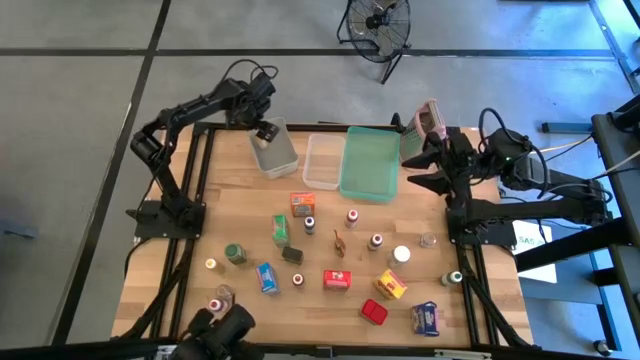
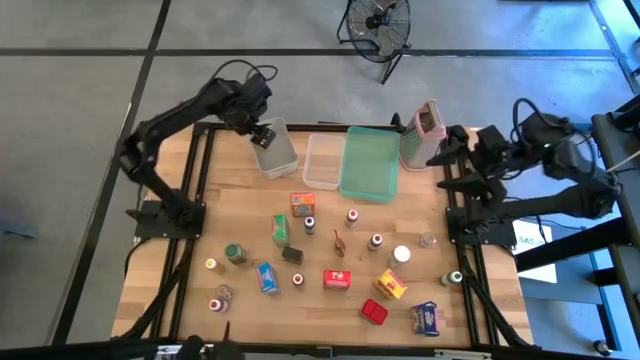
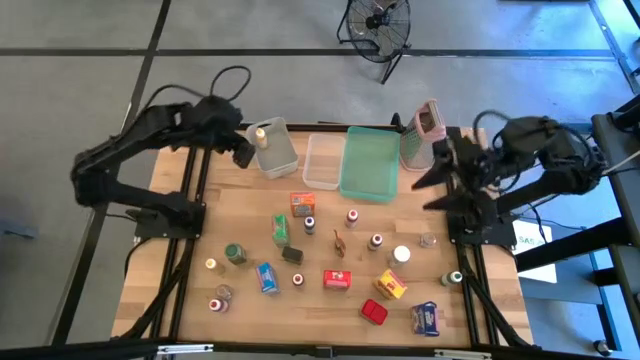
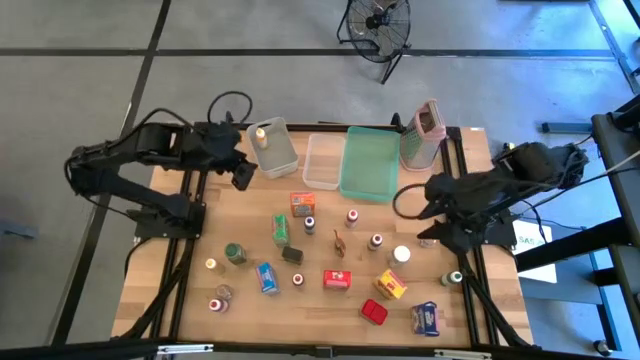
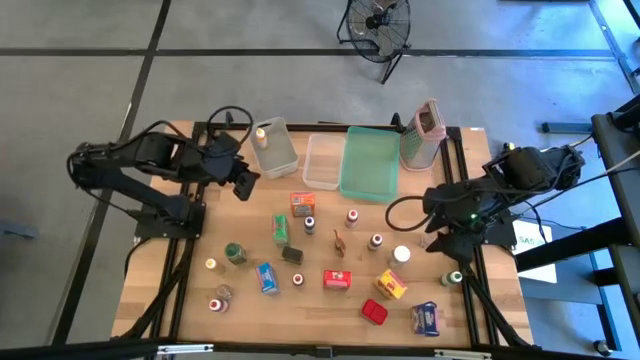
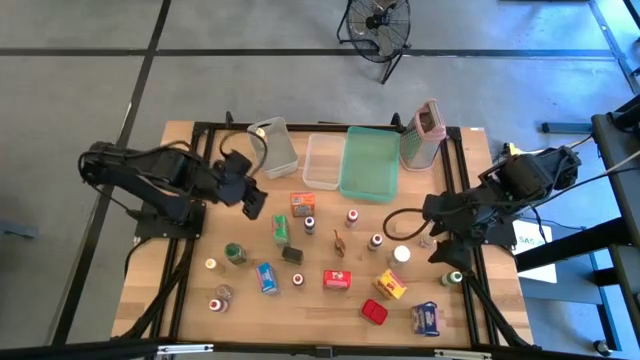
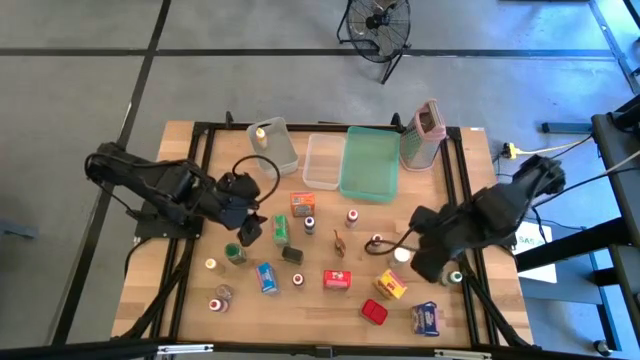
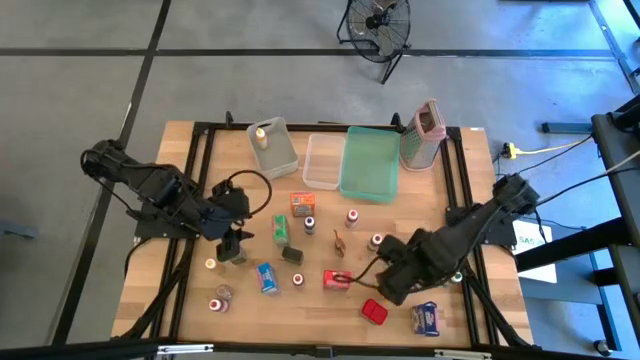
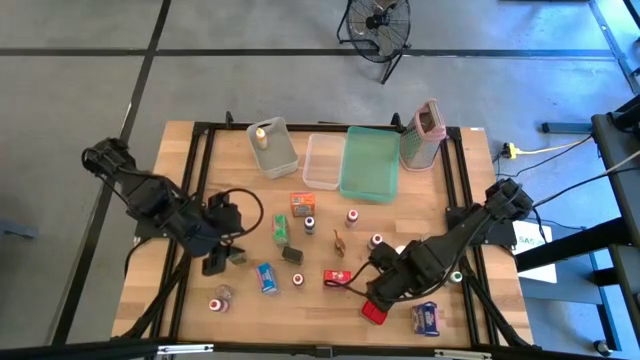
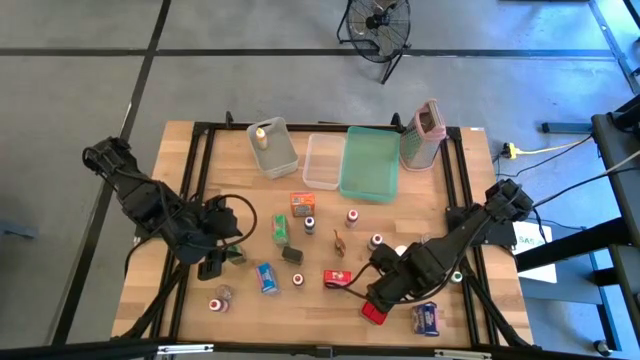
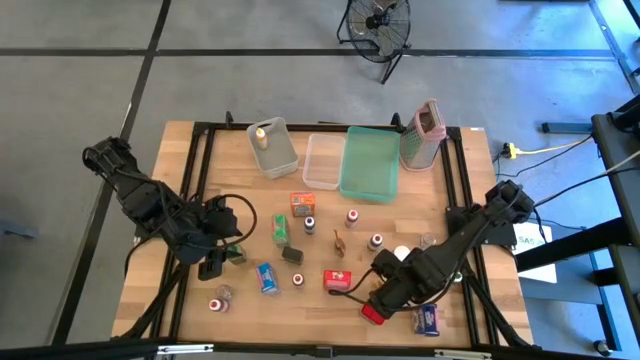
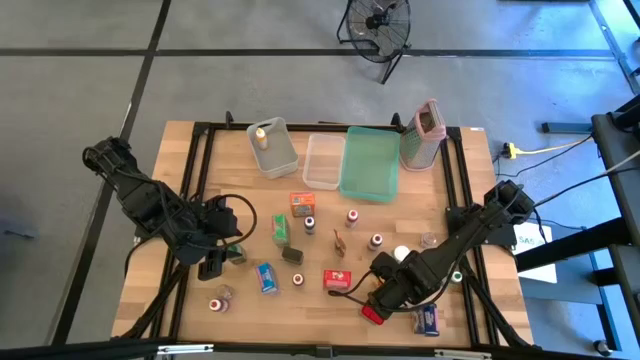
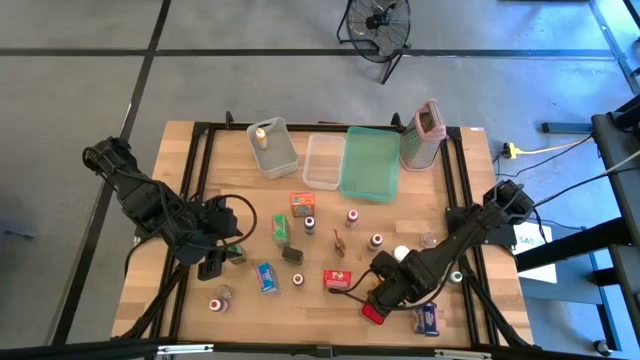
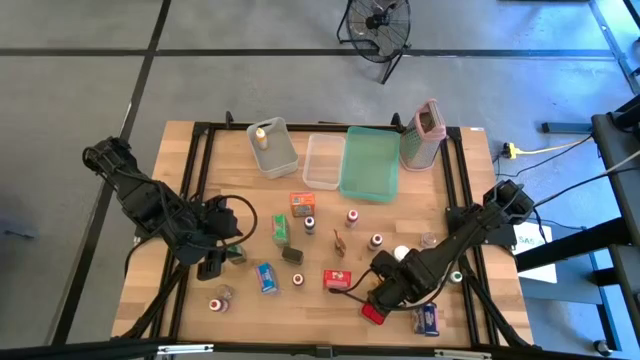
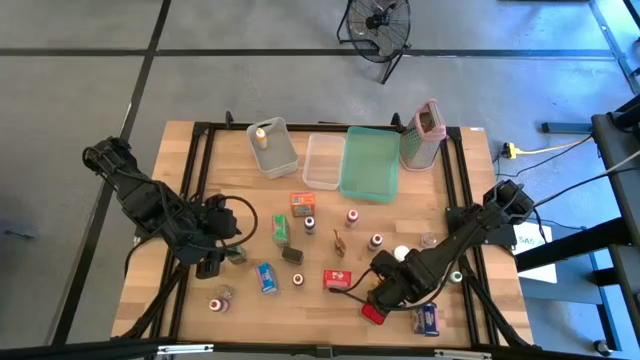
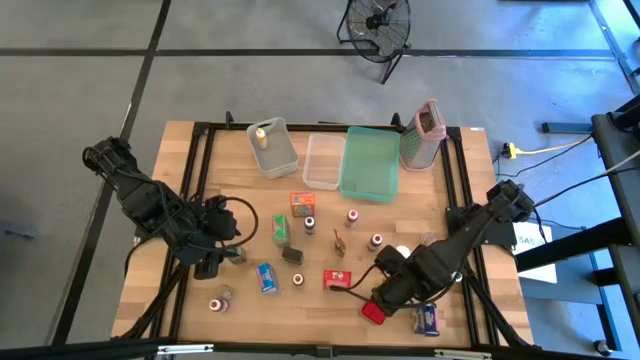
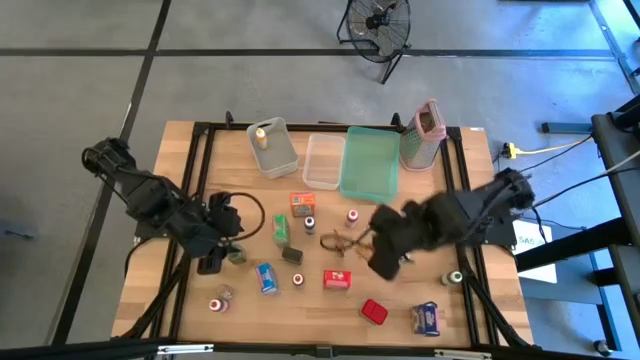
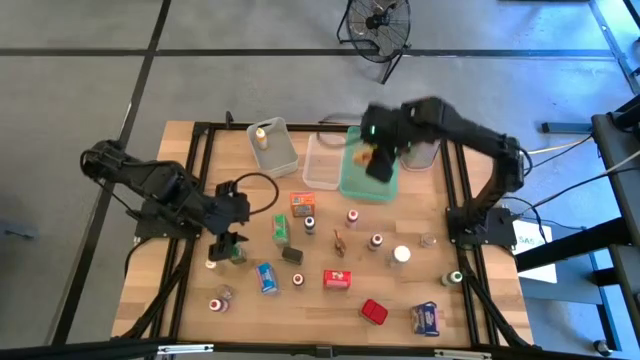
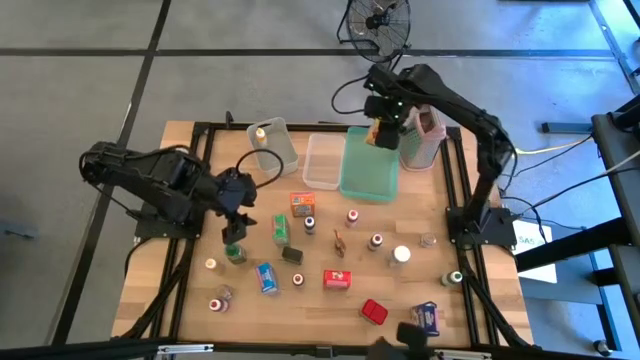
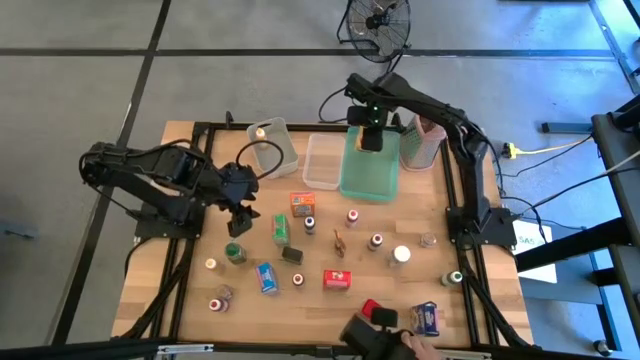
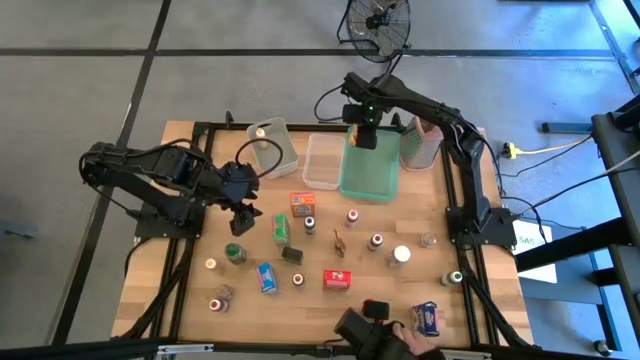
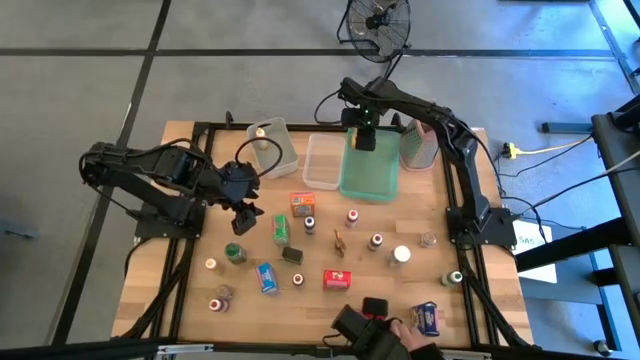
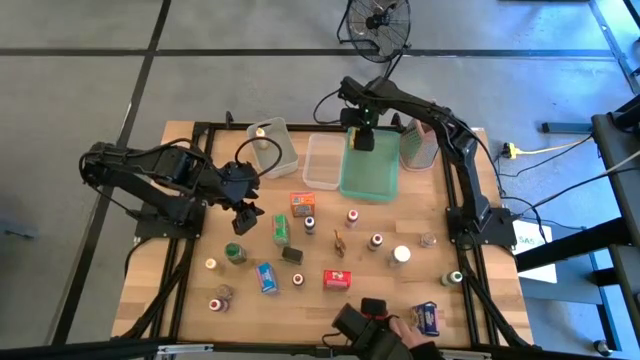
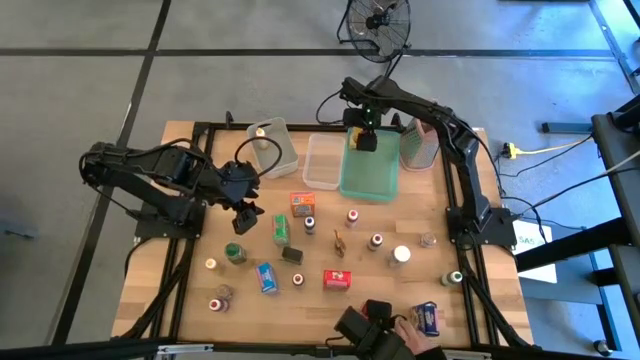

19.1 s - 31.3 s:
Task: Pick & Place Kitchen Items
Put the yellow cereal box into the green bin

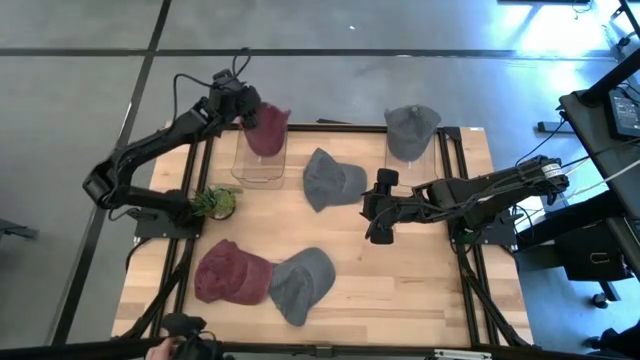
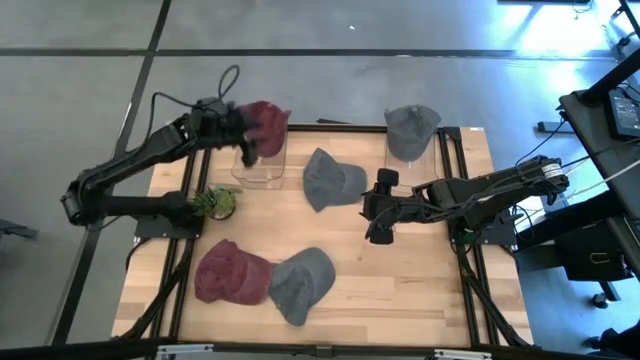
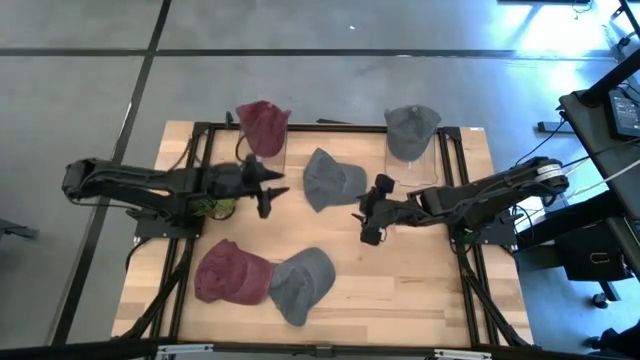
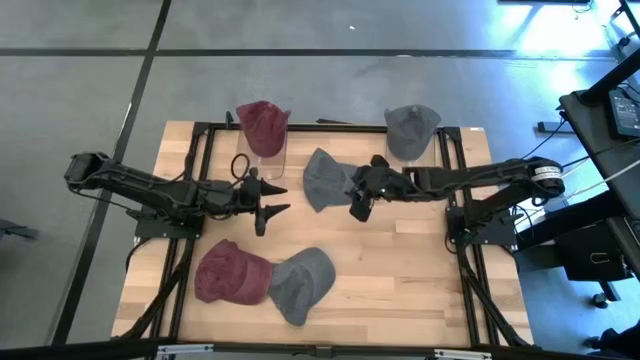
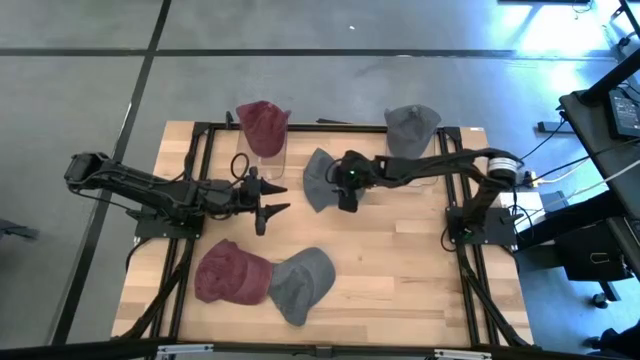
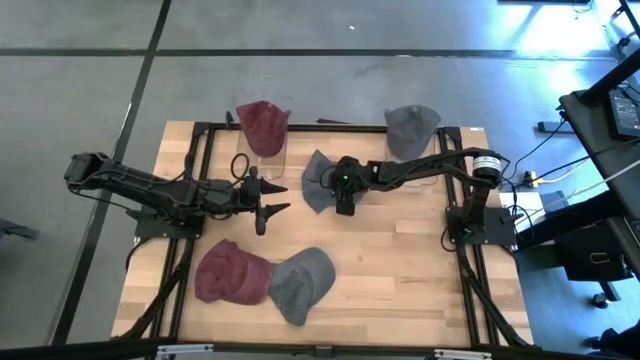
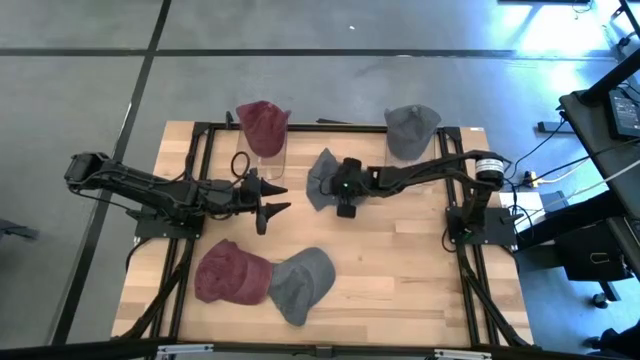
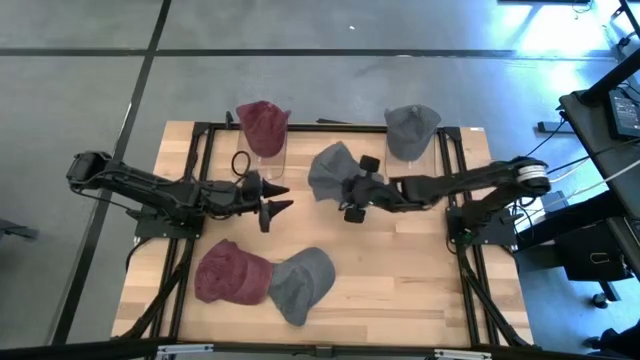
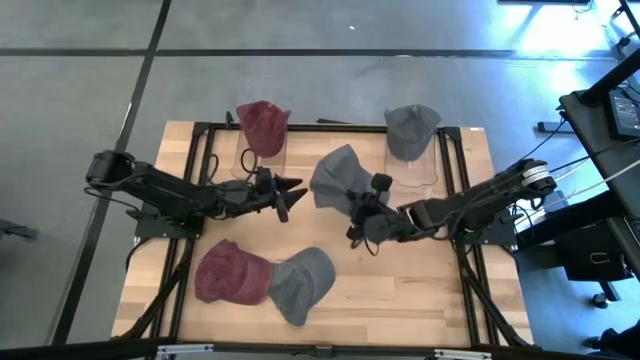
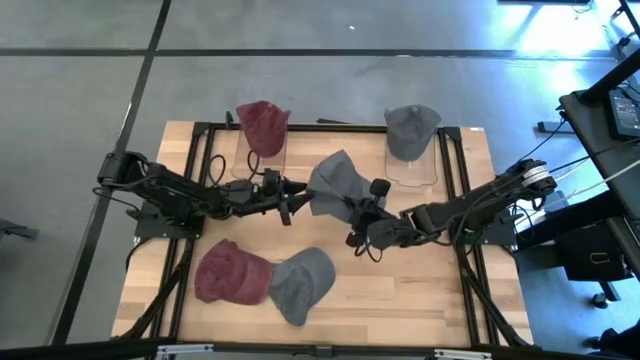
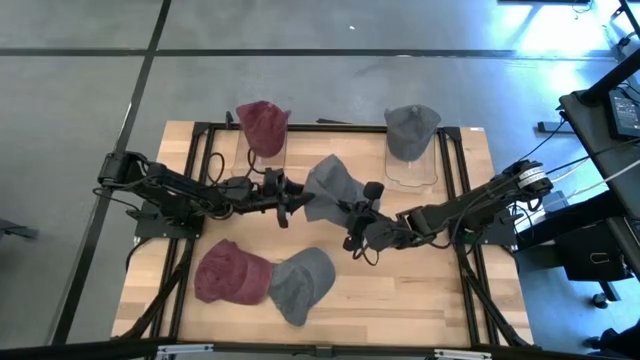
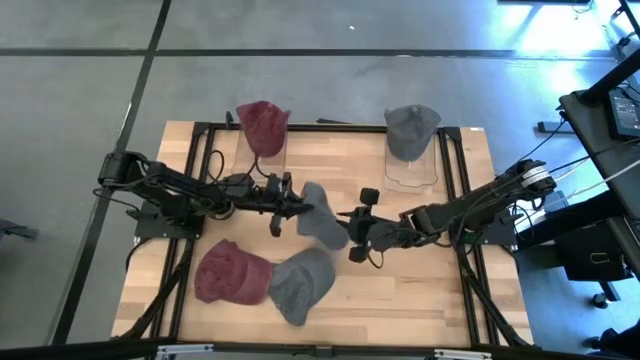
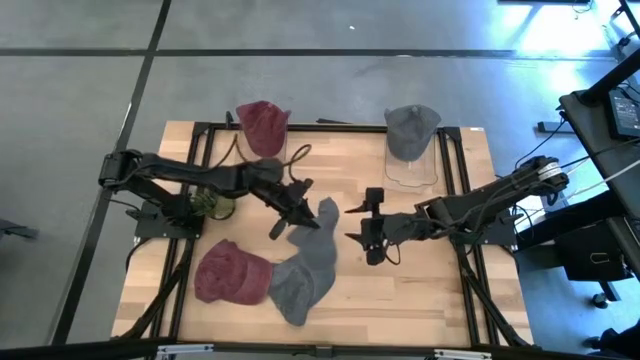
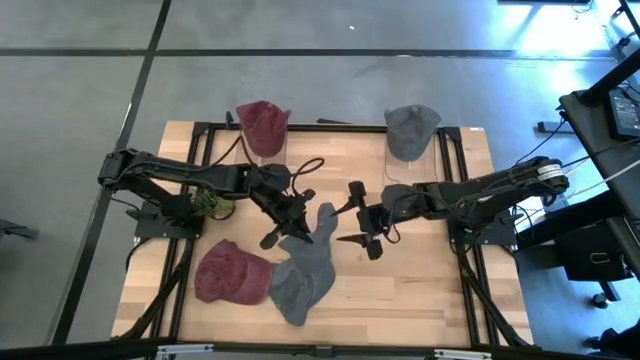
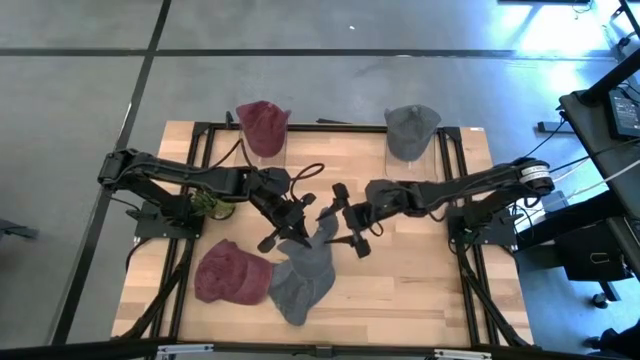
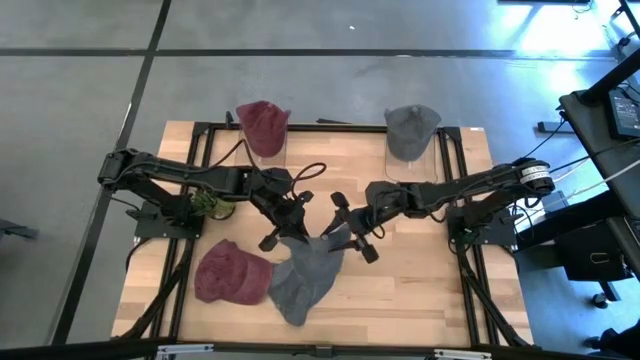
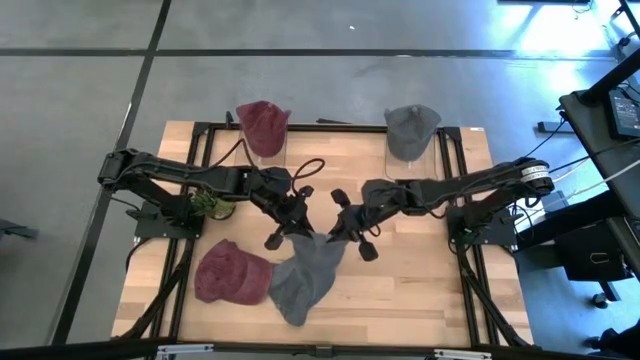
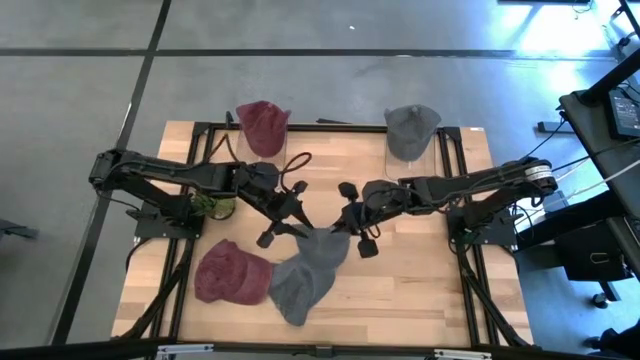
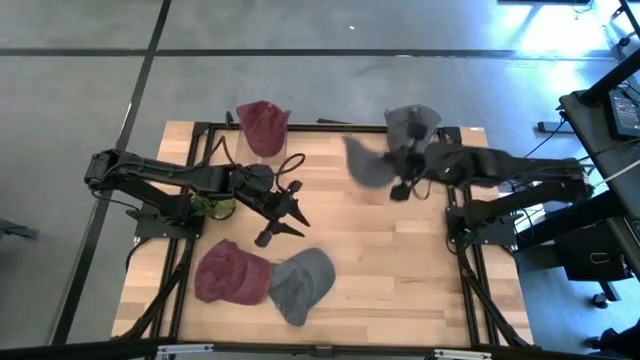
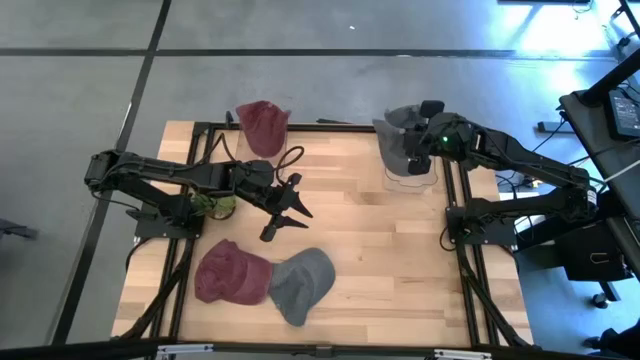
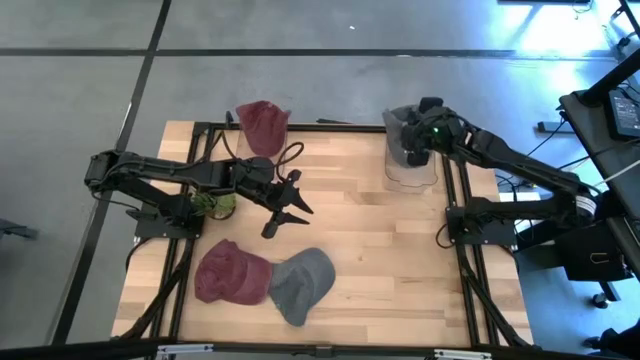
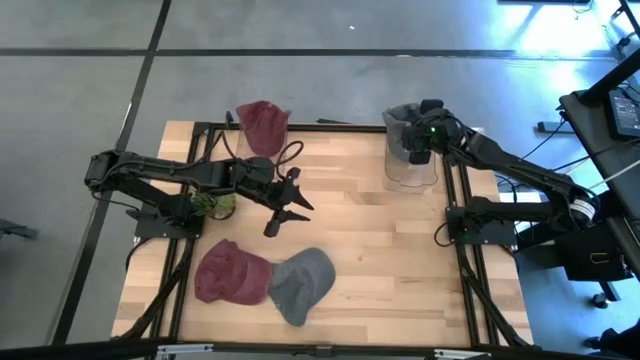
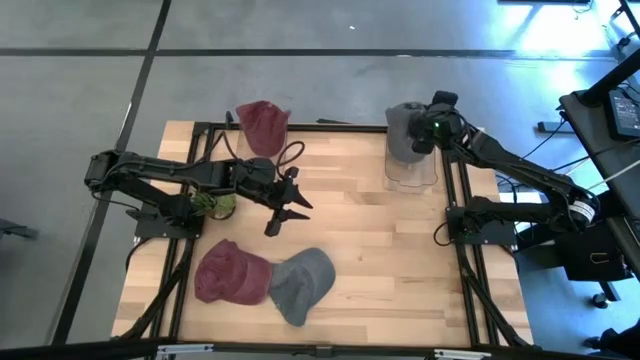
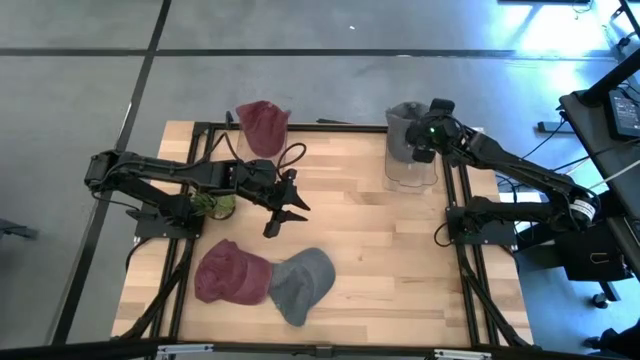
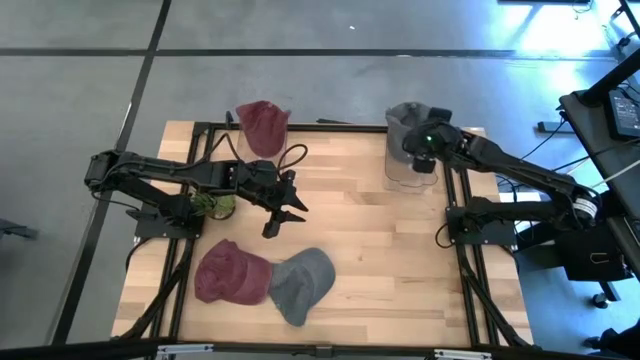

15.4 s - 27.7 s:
Task: Pick & Place hat
Put the top gray cap into the right transparent bin
